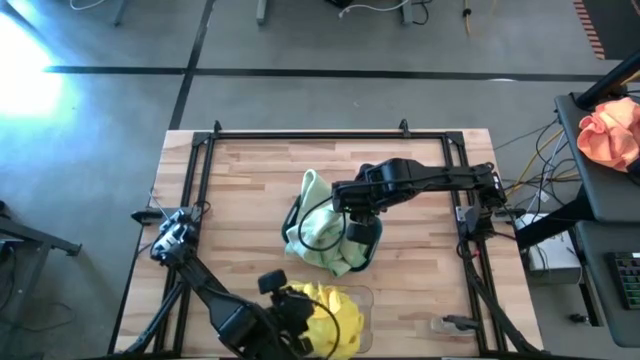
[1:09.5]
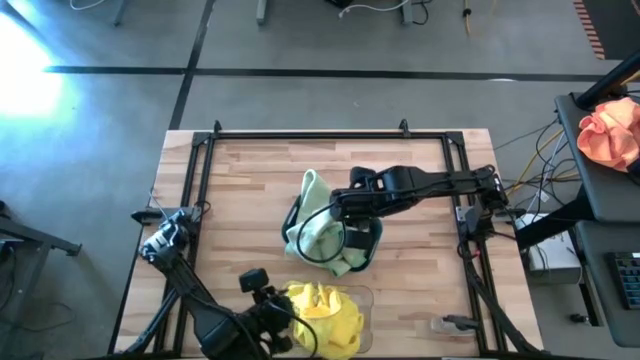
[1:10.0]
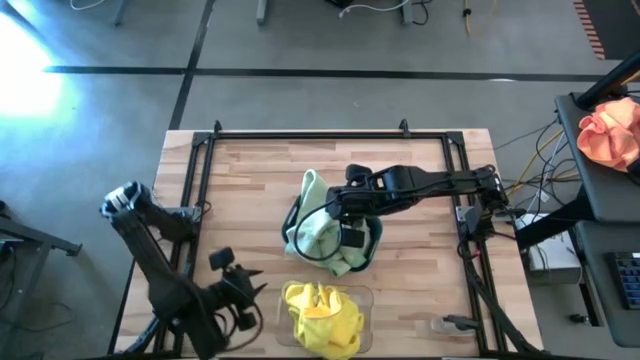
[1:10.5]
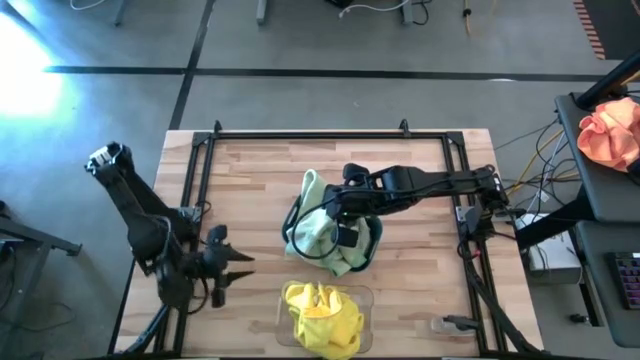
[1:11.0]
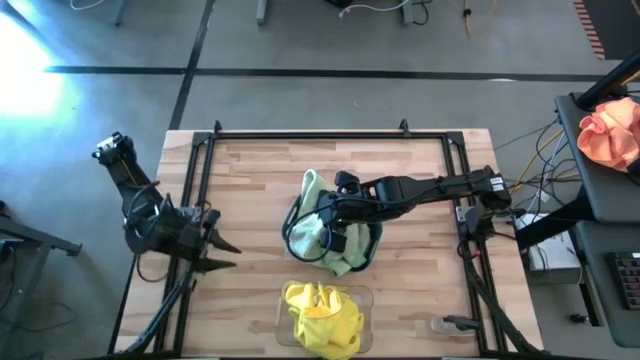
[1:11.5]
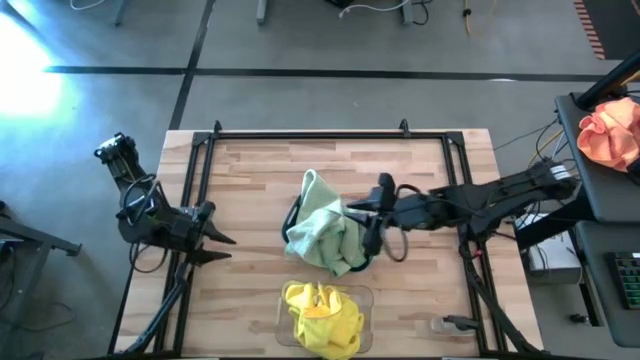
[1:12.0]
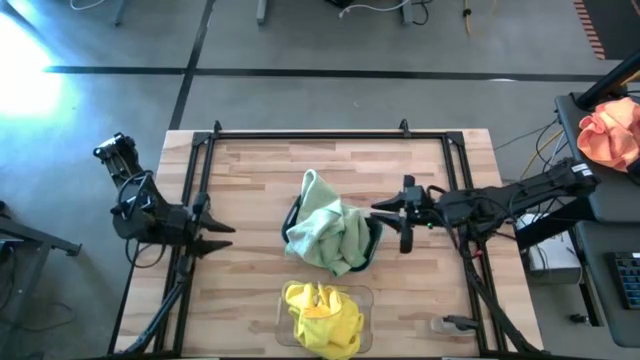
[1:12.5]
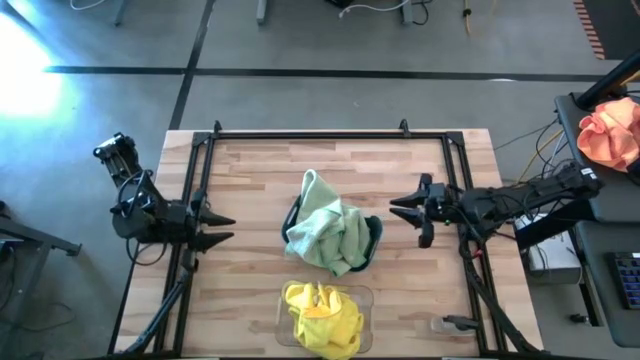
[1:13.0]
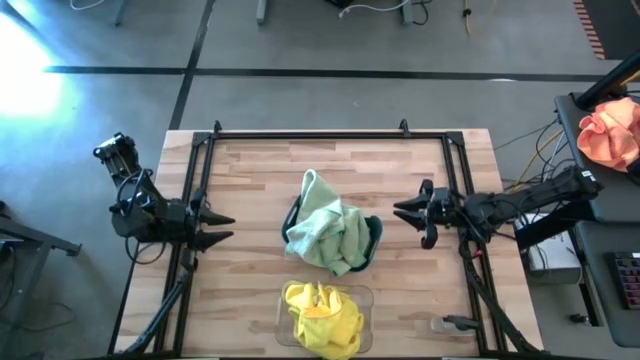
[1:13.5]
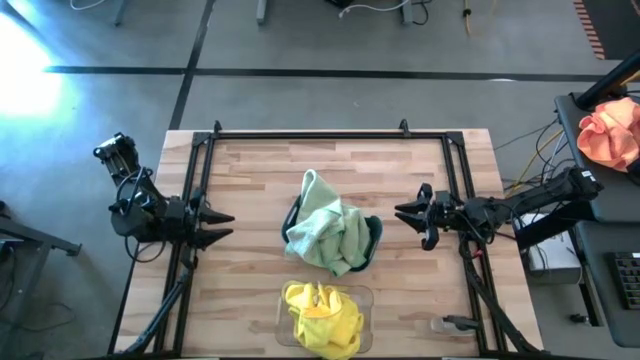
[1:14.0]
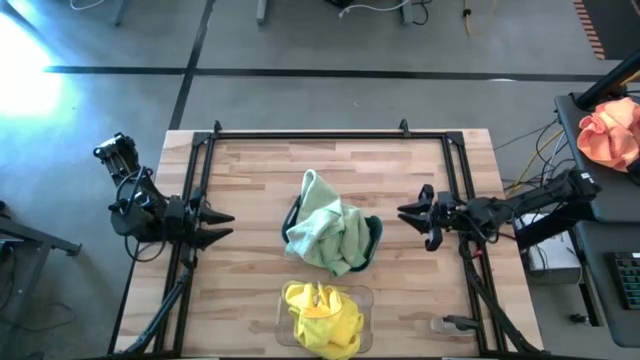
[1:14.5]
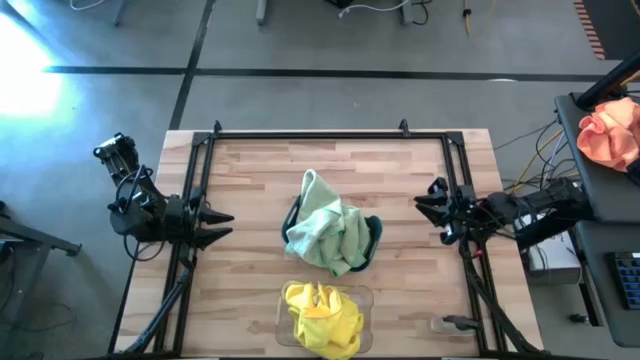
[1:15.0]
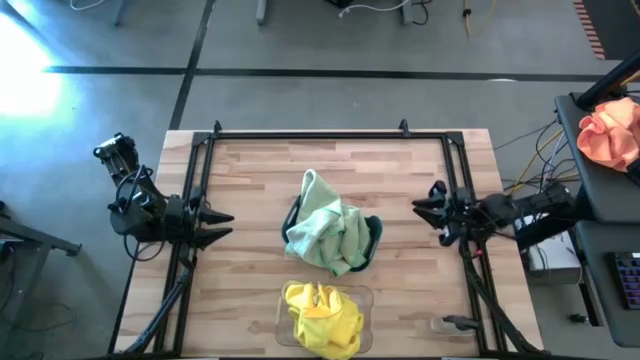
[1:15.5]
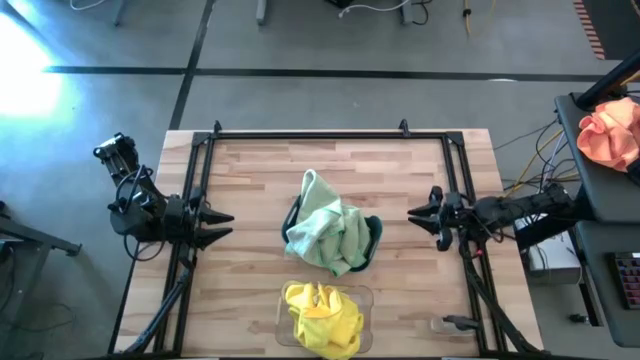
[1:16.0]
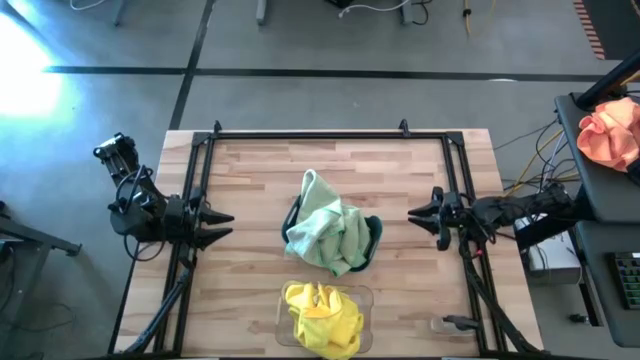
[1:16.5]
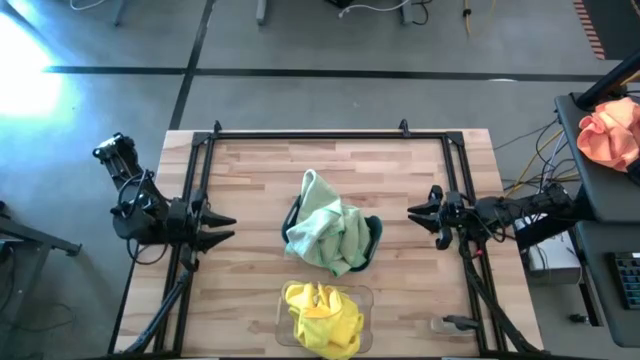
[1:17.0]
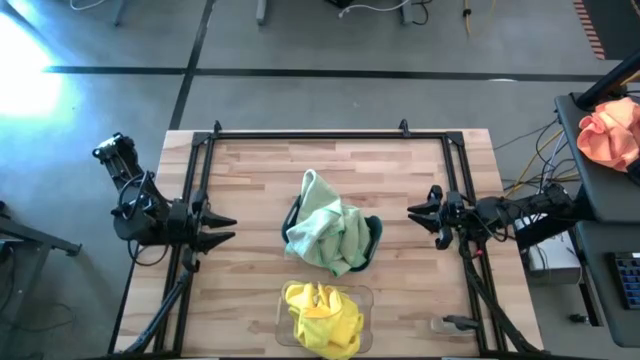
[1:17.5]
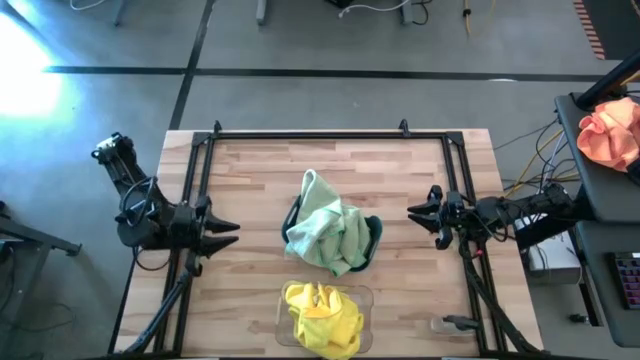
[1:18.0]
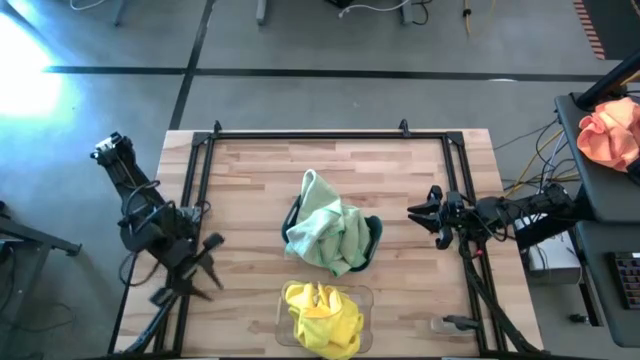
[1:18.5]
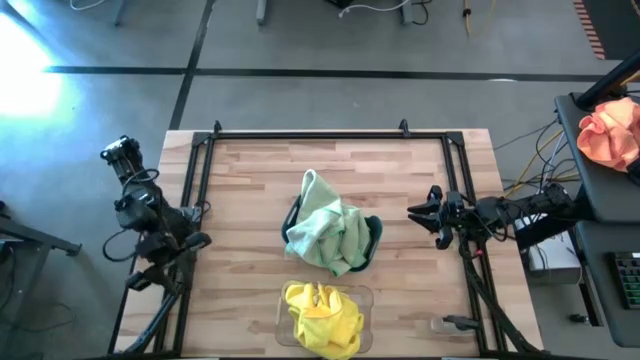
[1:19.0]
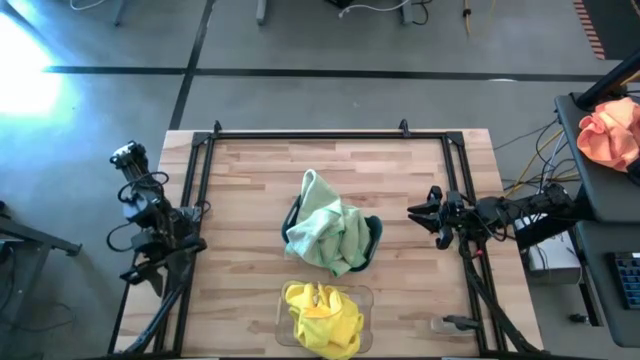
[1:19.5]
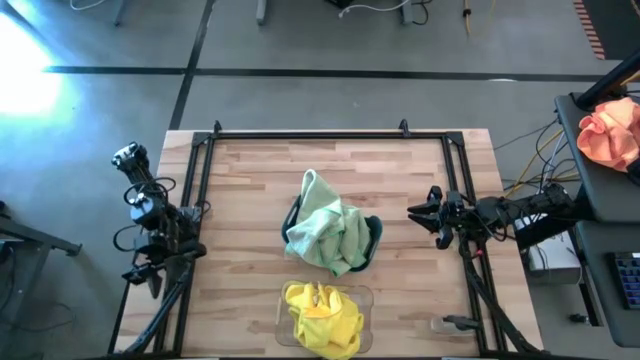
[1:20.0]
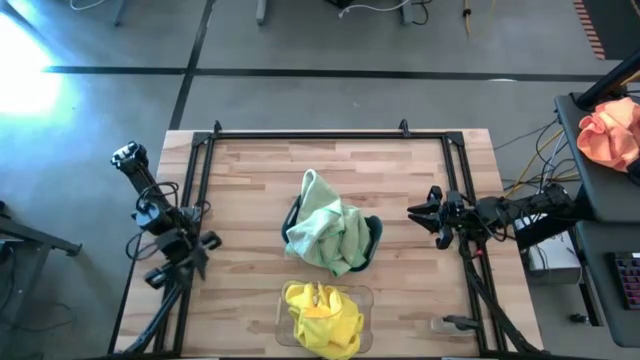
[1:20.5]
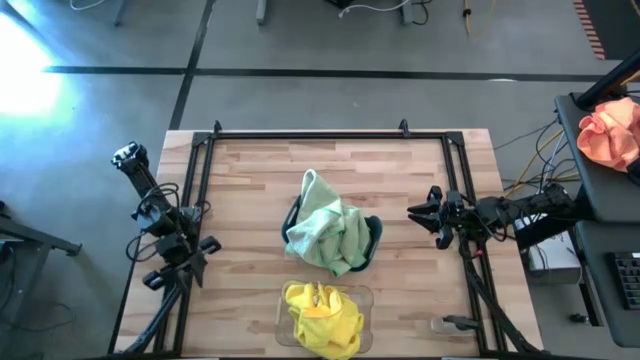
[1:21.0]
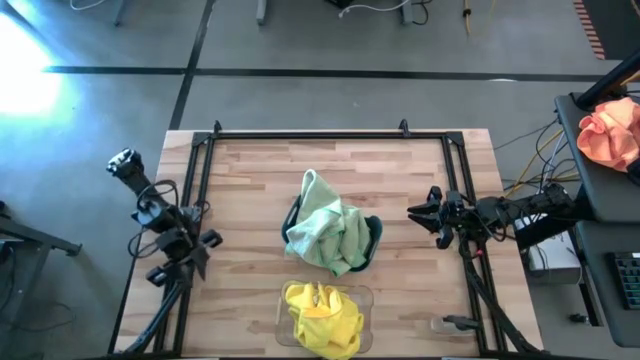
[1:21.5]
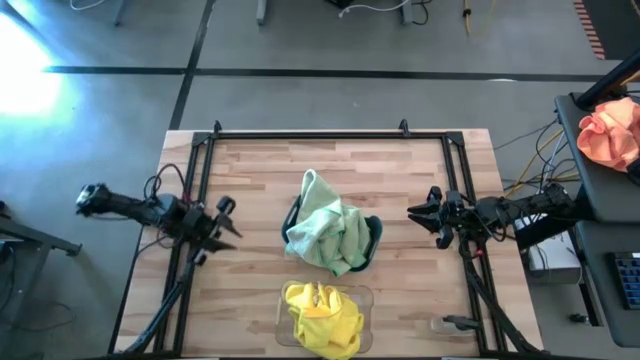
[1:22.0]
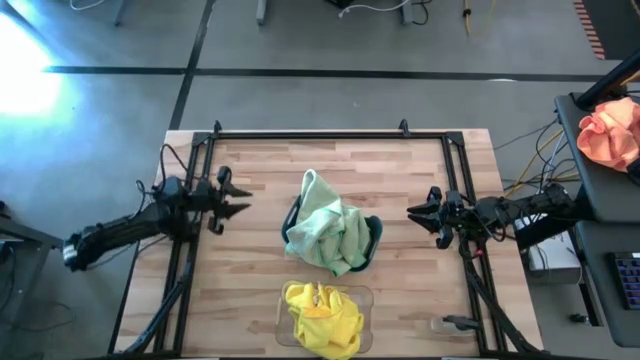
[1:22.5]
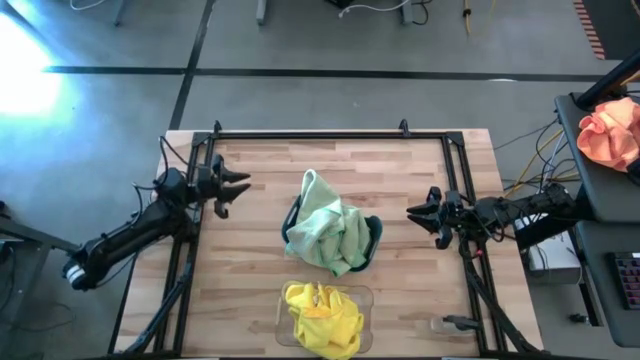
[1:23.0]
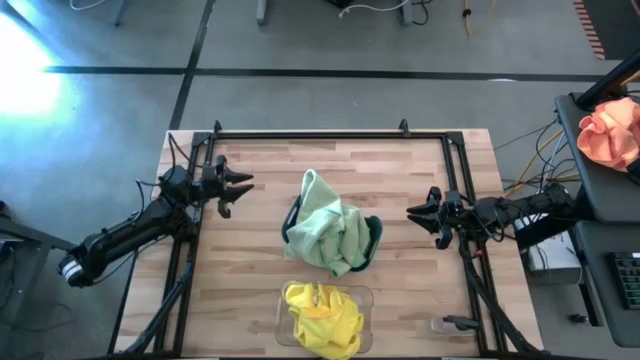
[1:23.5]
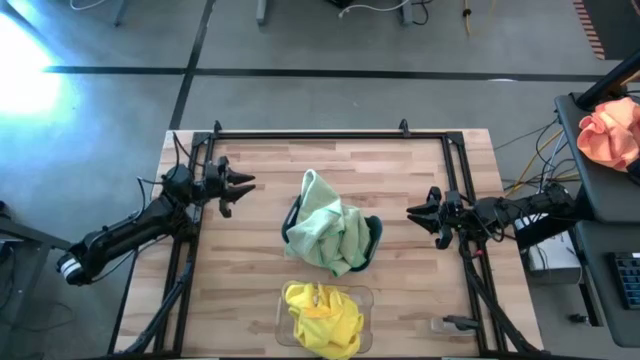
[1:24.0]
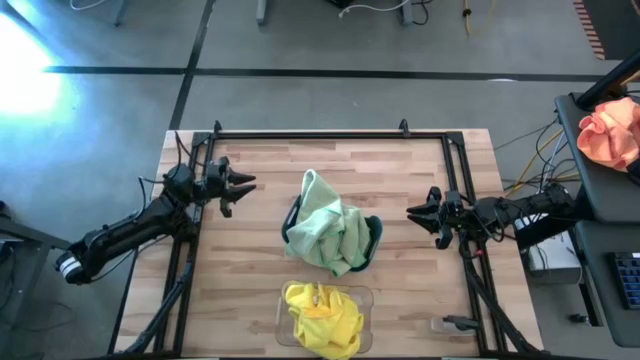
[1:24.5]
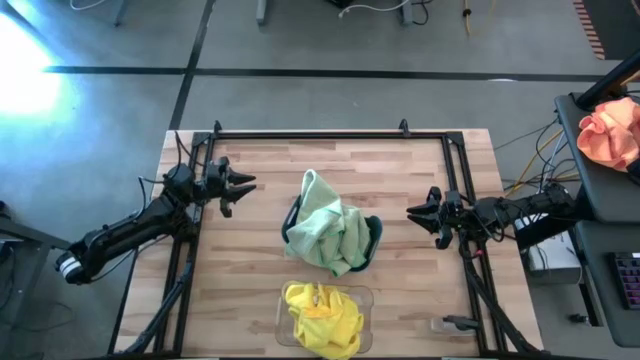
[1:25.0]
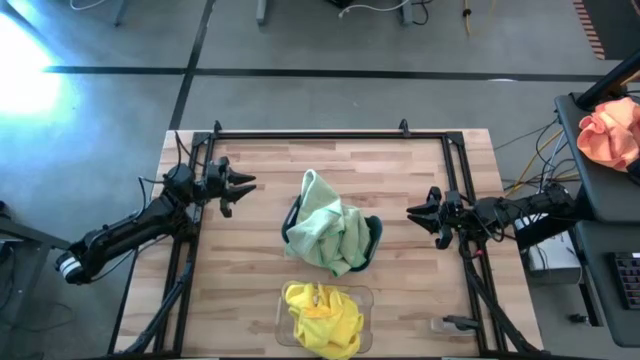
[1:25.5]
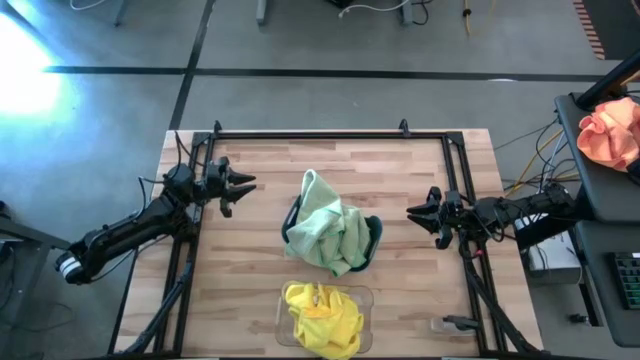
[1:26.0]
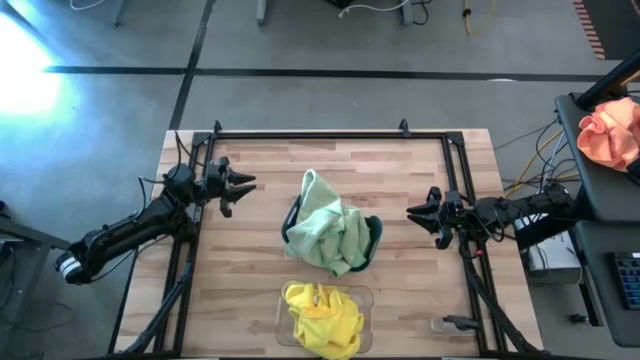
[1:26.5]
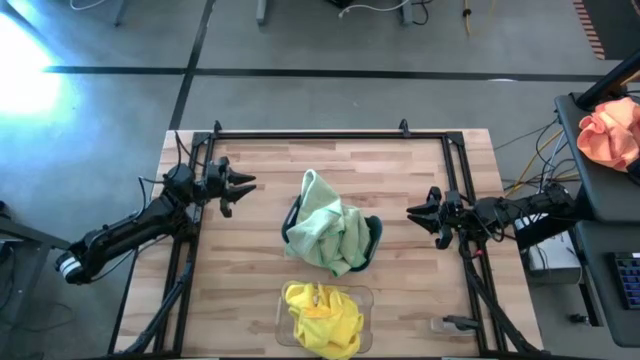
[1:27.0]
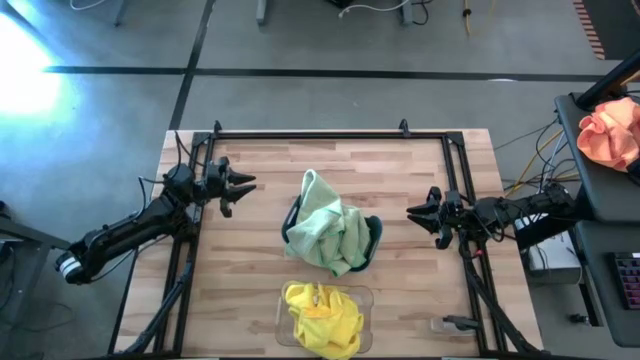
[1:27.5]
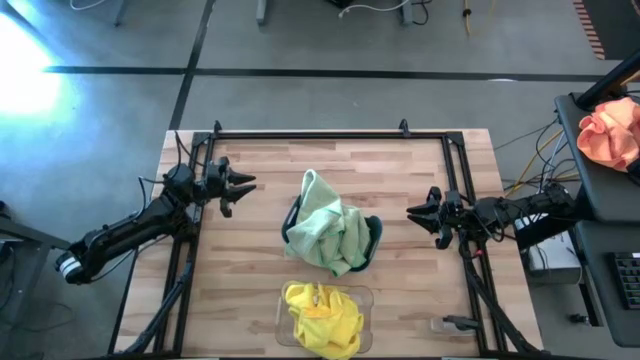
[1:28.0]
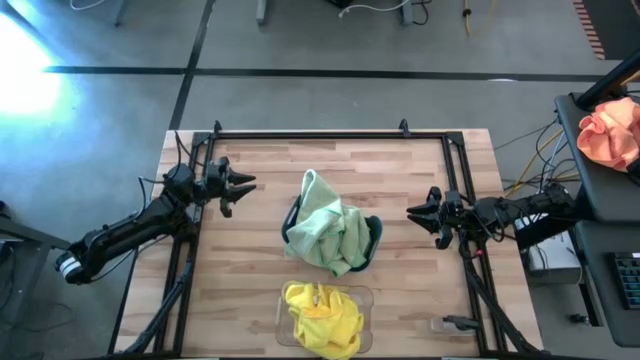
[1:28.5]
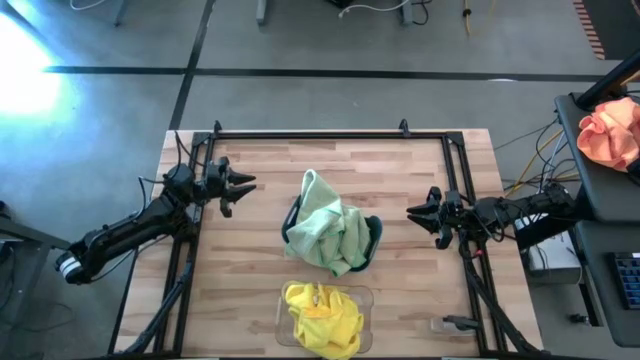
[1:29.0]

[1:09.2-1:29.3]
Task: Sort microfiber towel by color & place in baskets
Return to Home Position

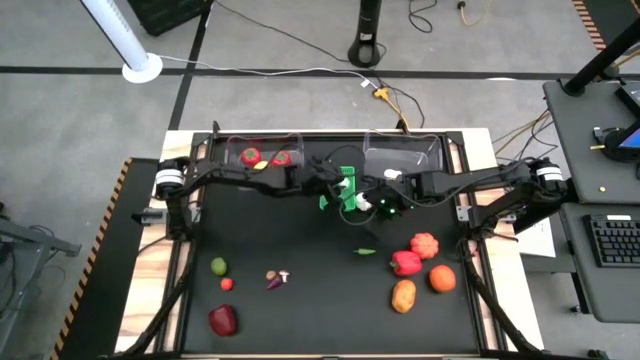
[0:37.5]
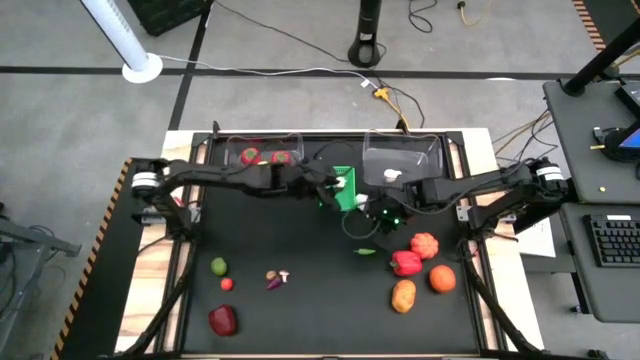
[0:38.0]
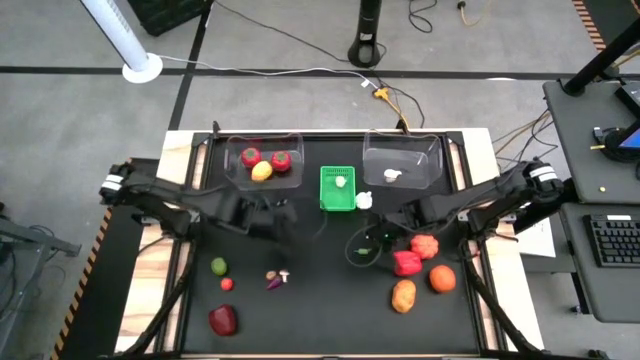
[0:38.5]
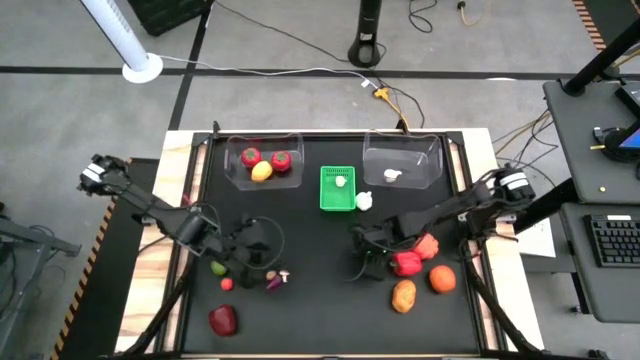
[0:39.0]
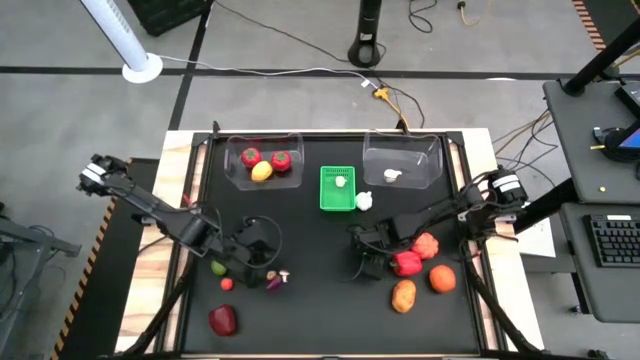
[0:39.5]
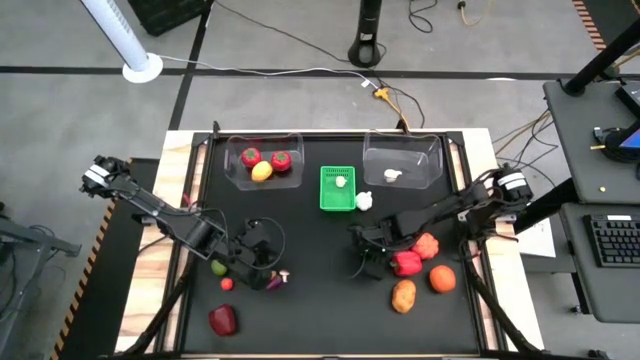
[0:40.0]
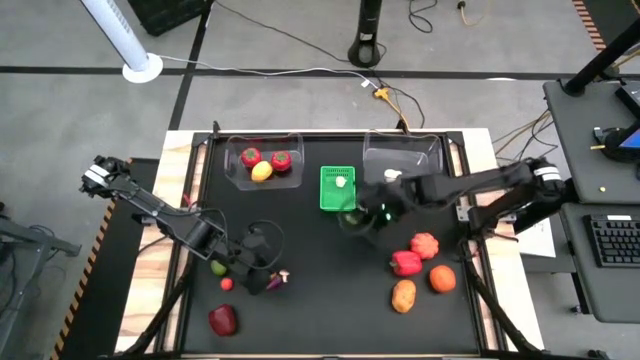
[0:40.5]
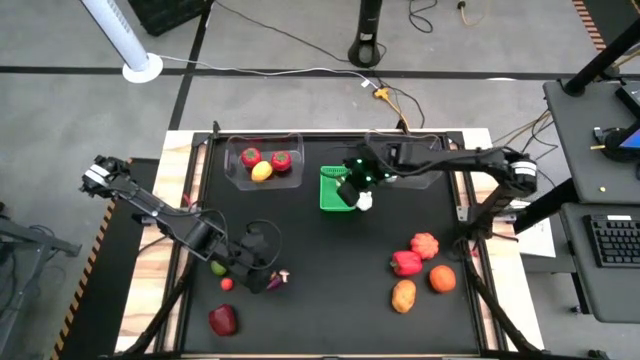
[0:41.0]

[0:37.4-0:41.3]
Task: Sort produce into baskets
Put the green chili into the green basket
